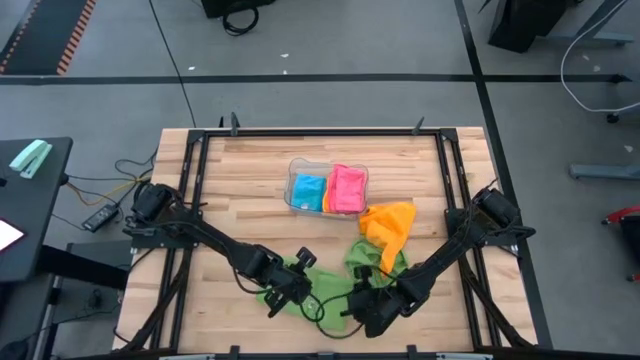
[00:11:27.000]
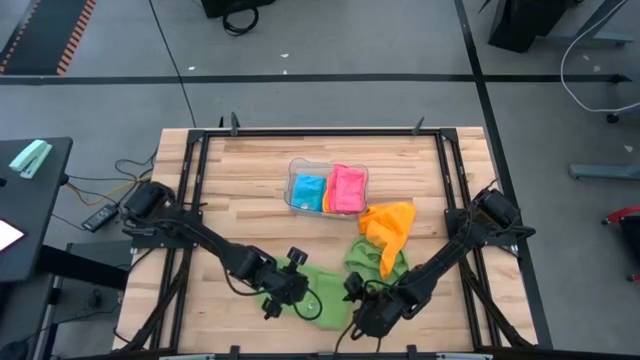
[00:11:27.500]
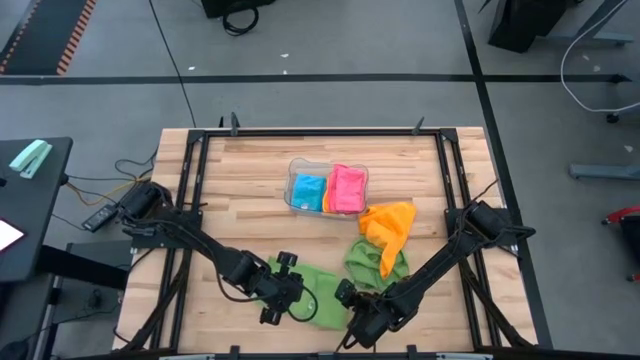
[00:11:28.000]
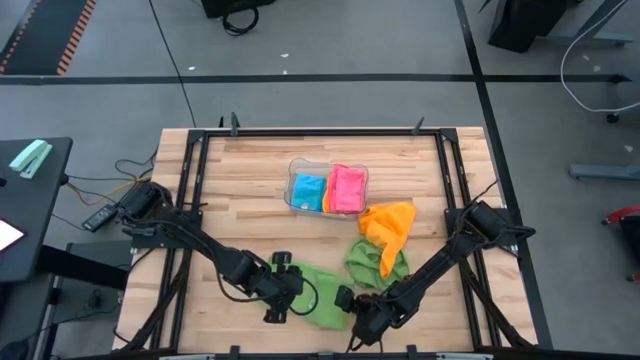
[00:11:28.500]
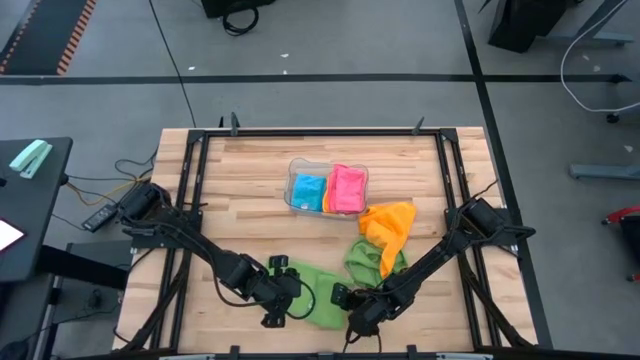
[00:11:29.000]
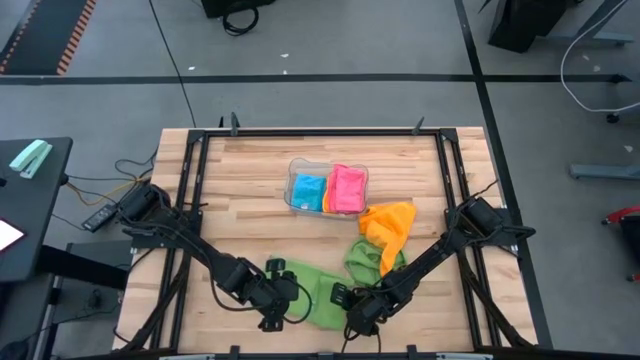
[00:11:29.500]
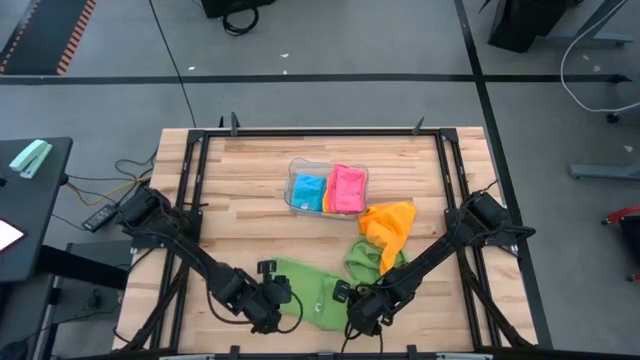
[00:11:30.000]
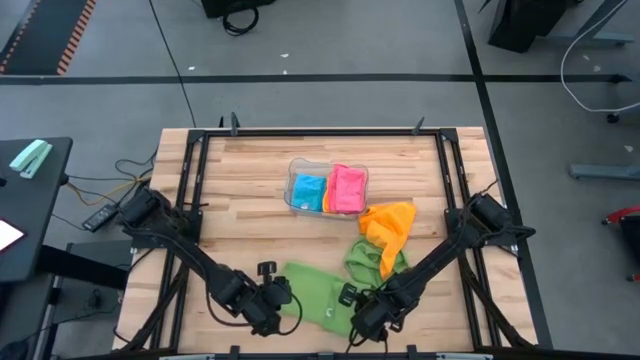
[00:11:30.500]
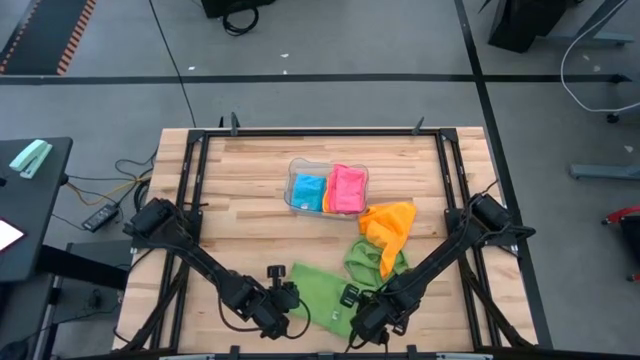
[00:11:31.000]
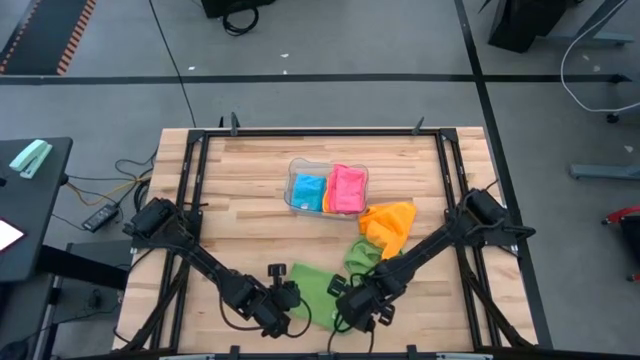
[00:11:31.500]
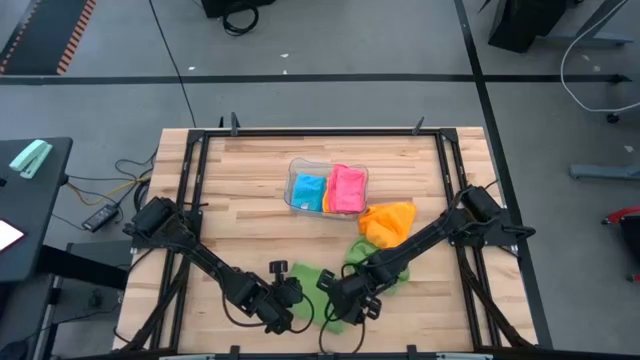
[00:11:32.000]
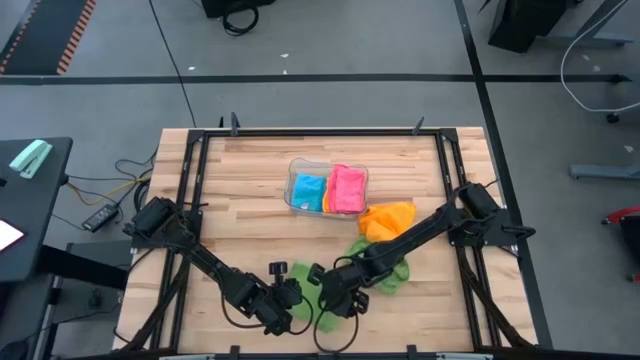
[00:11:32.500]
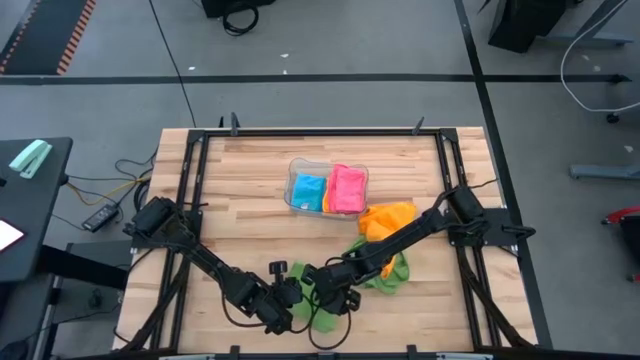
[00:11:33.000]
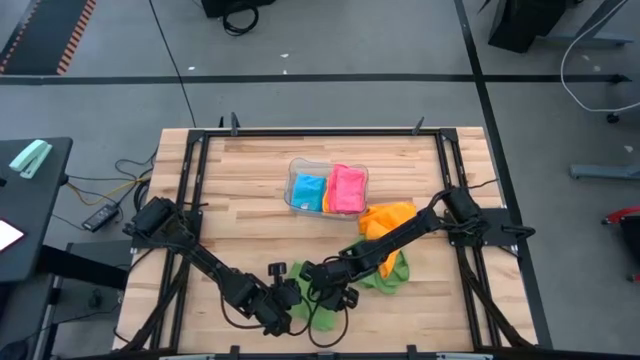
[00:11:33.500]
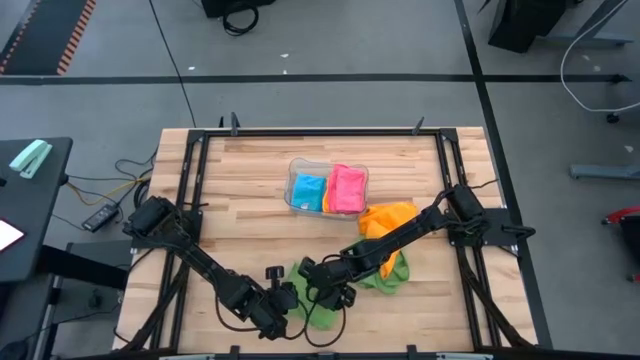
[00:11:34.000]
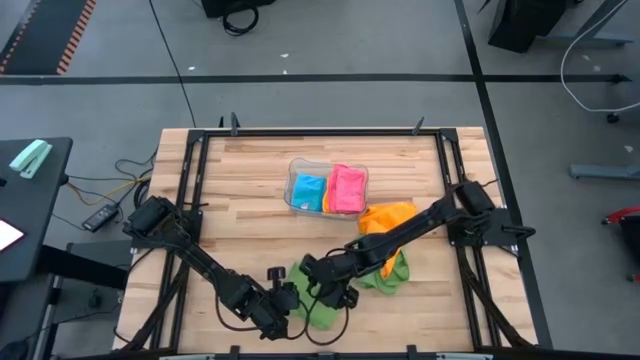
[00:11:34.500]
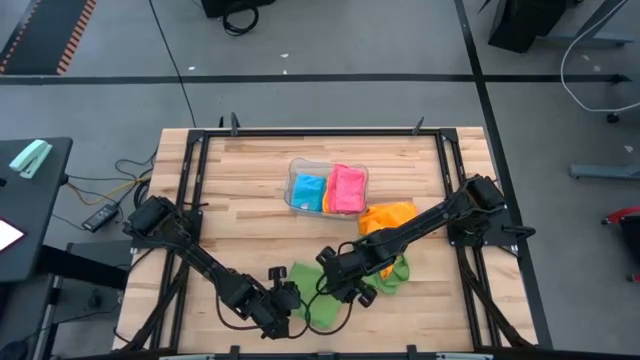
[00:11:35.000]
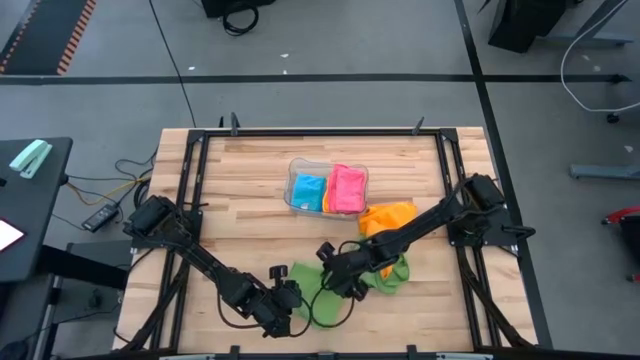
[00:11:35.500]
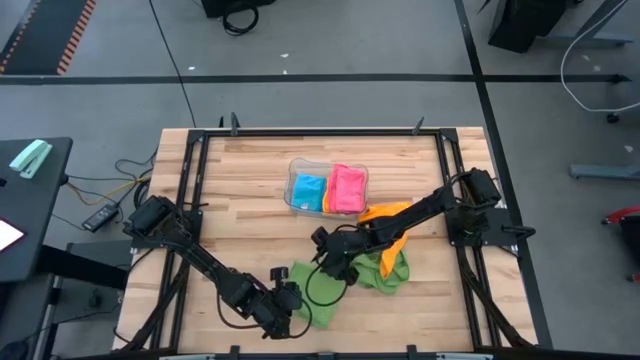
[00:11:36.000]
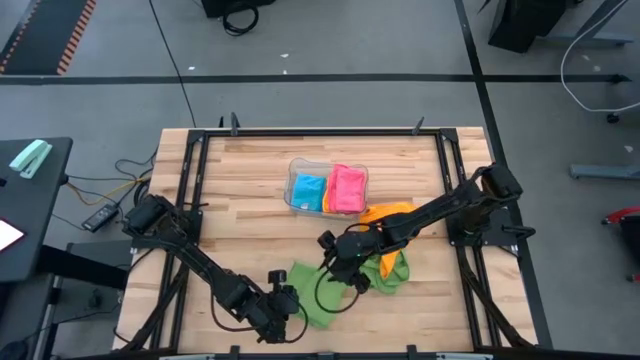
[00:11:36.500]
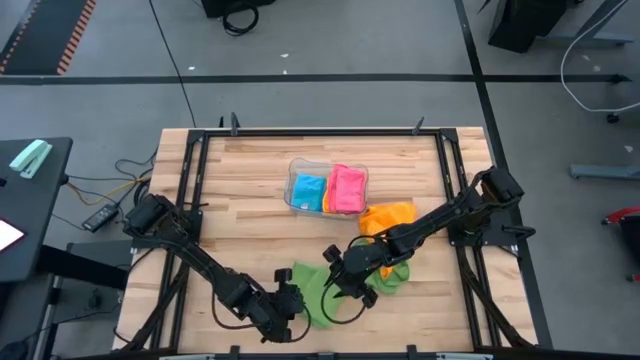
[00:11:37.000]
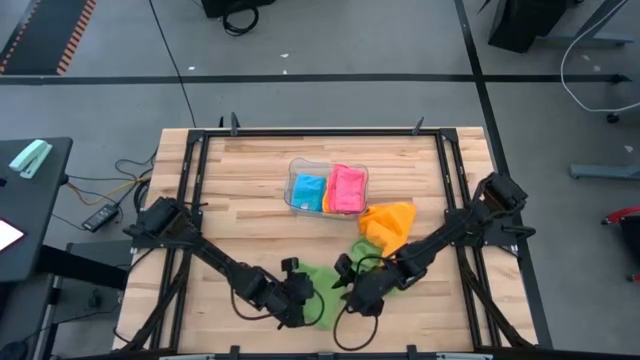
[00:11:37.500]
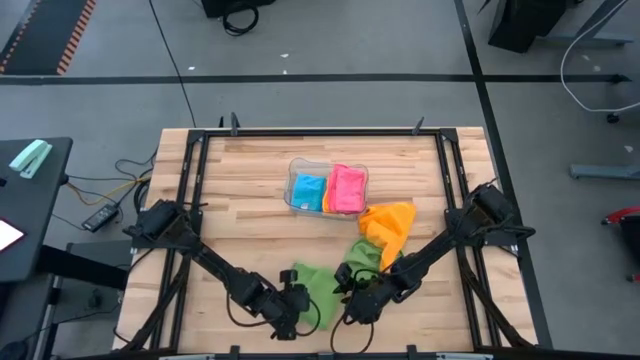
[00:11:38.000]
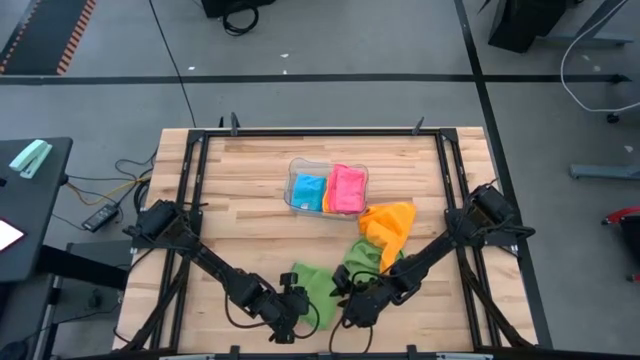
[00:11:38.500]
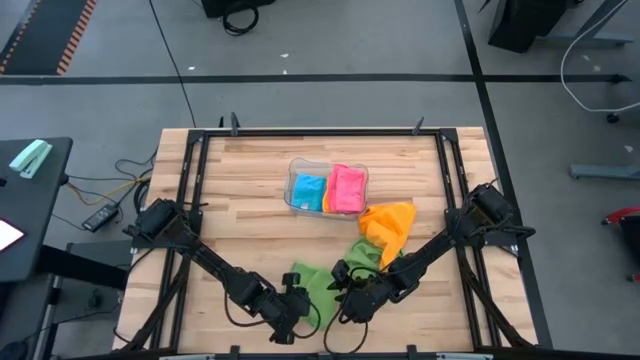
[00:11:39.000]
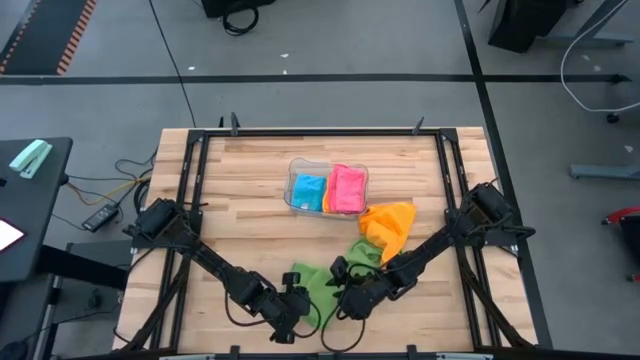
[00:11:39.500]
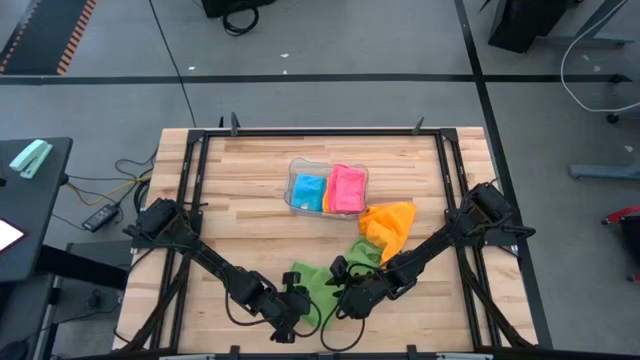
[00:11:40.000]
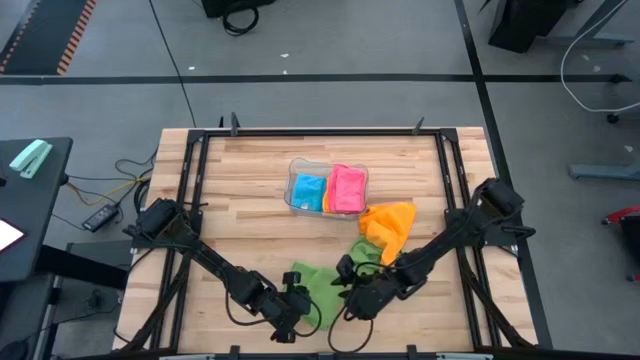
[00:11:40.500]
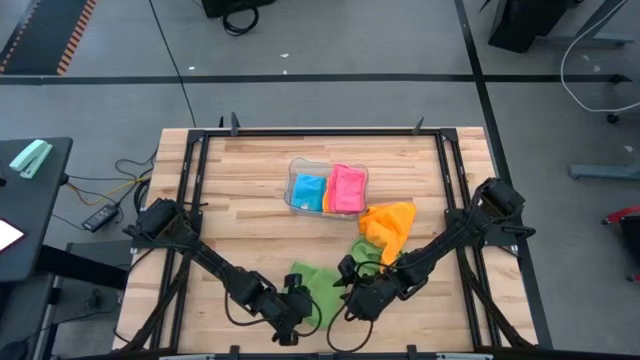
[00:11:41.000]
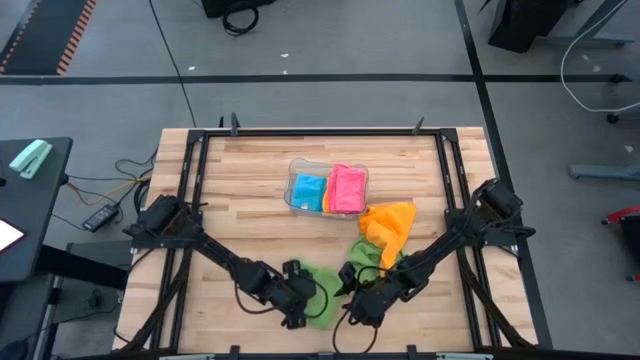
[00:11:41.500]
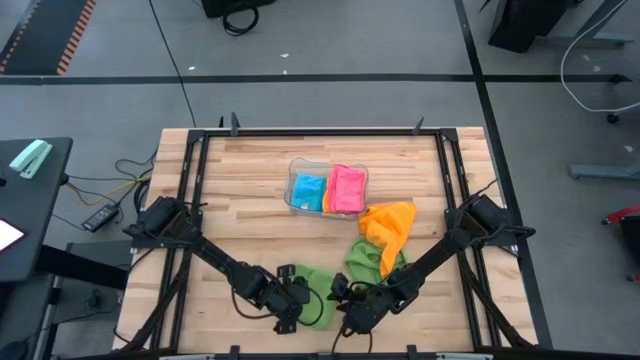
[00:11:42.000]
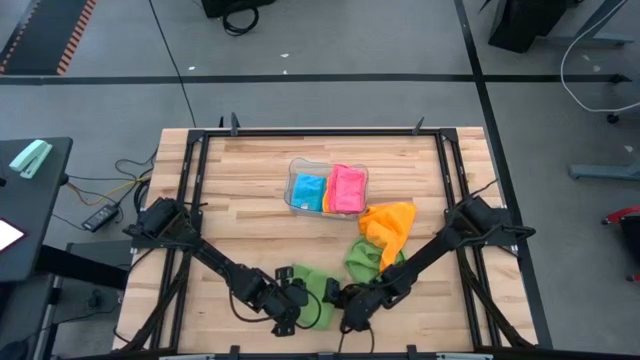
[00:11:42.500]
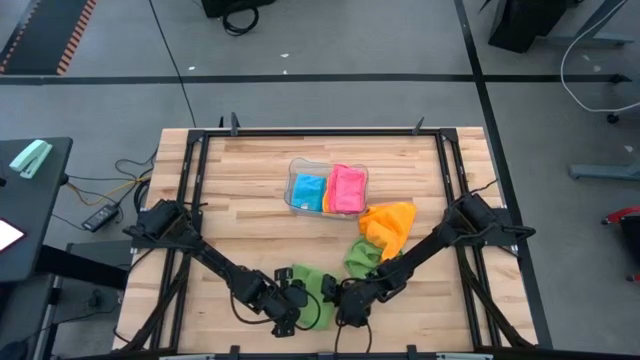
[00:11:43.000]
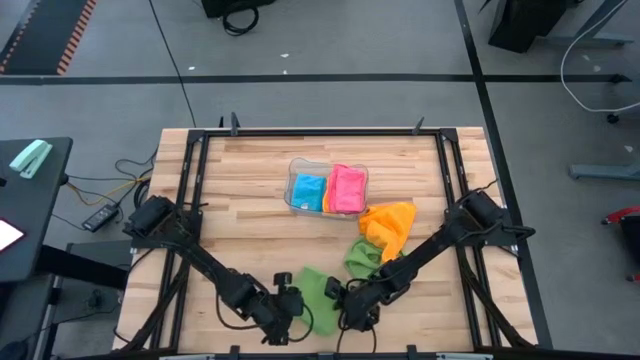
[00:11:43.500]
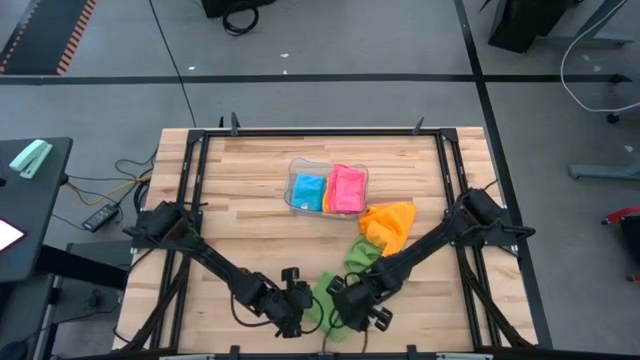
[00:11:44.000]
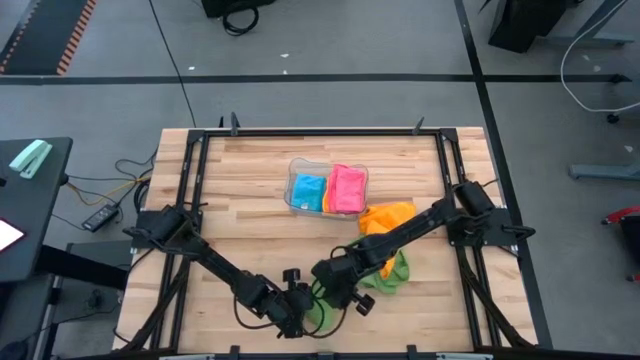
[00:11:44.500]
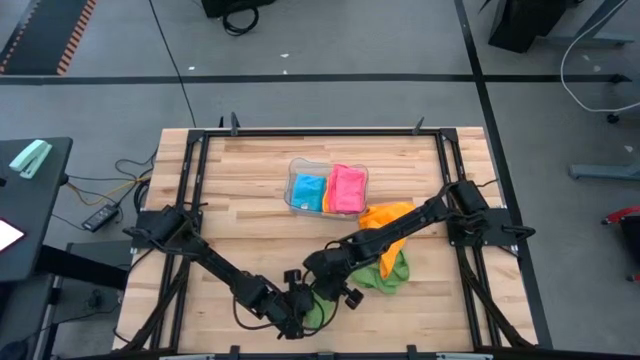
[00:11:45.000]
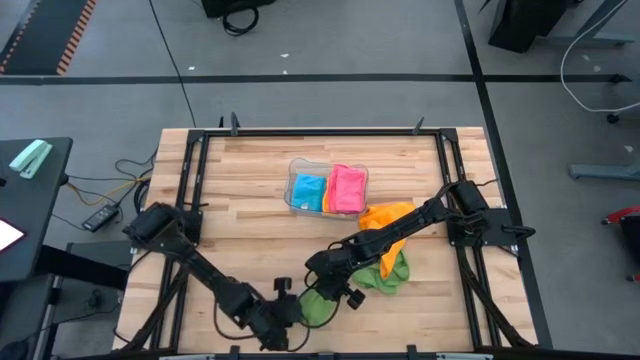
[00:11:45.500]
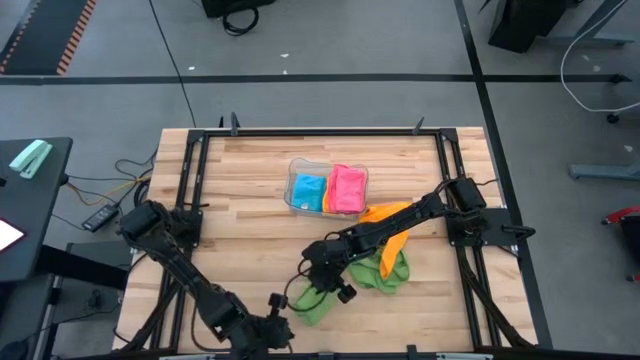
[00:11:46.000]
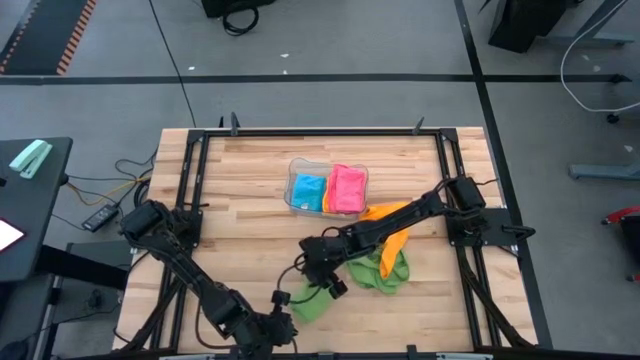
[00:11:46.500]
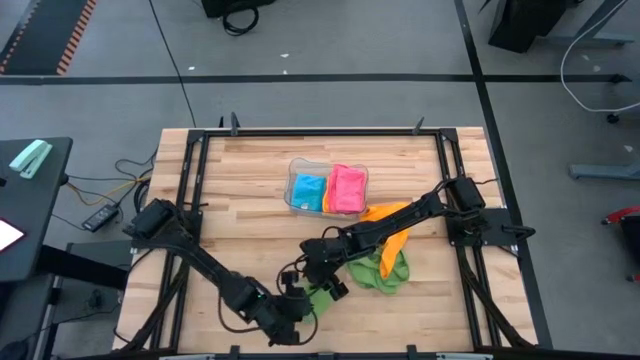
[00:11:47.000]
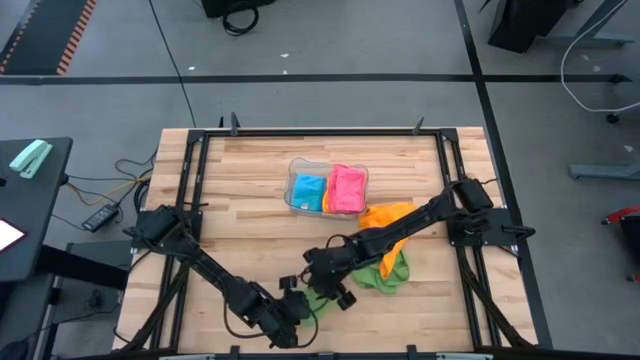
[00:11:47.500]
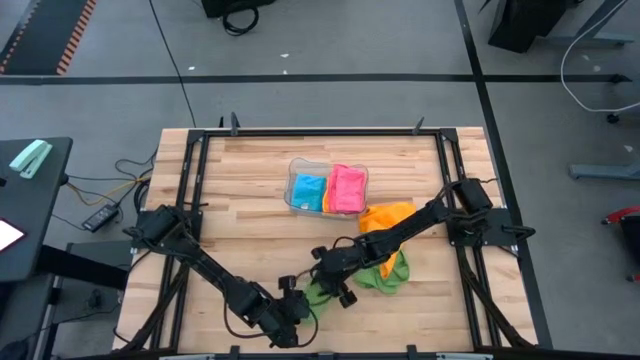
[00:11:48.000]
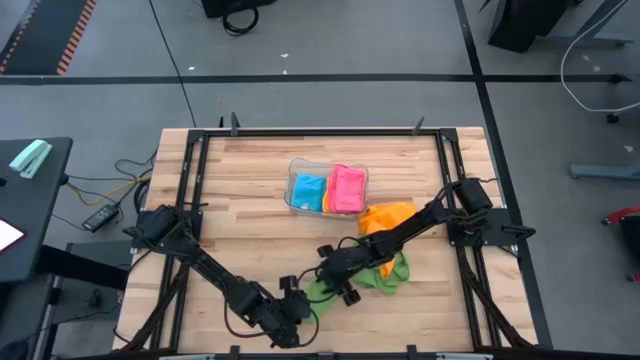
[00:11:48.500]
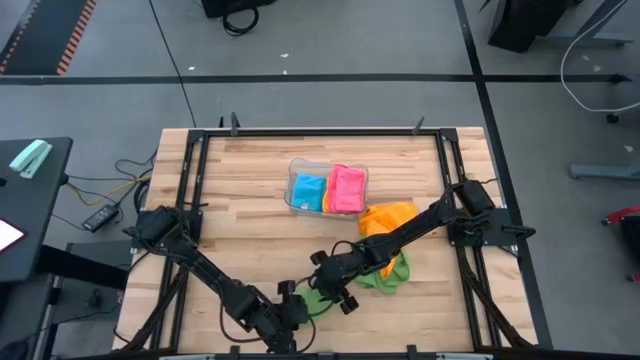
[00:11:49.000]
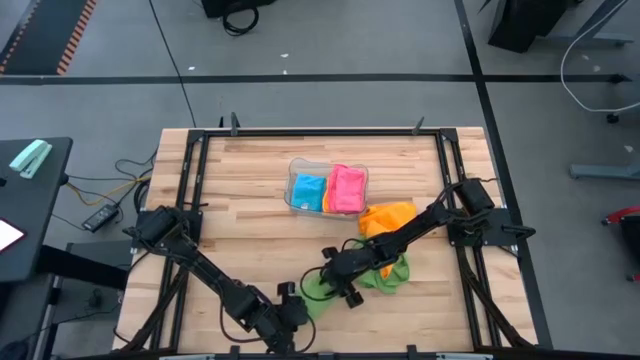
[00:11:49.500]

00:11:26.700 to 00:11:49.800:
Task: Fold microfiber towels
Fold the top green microfiber cloth
